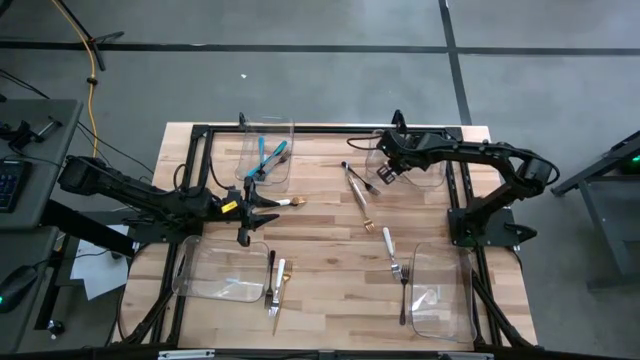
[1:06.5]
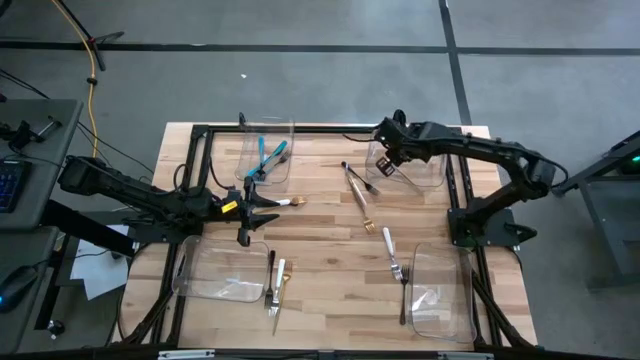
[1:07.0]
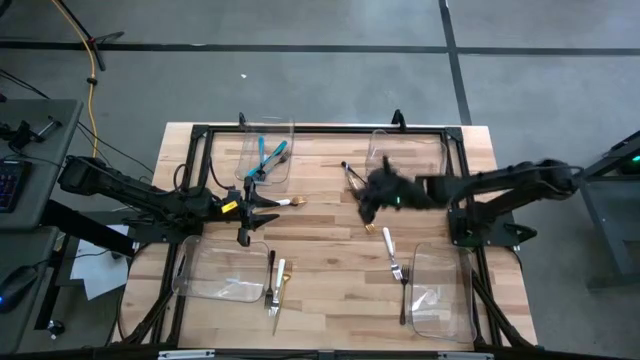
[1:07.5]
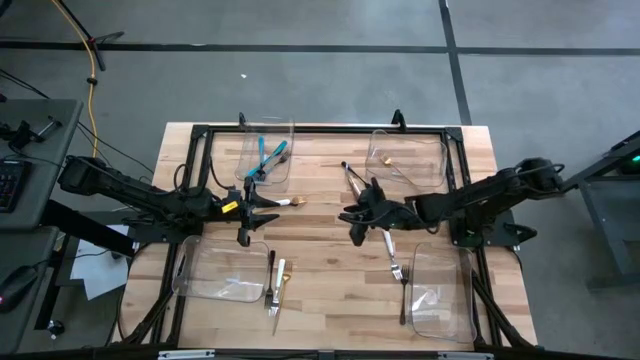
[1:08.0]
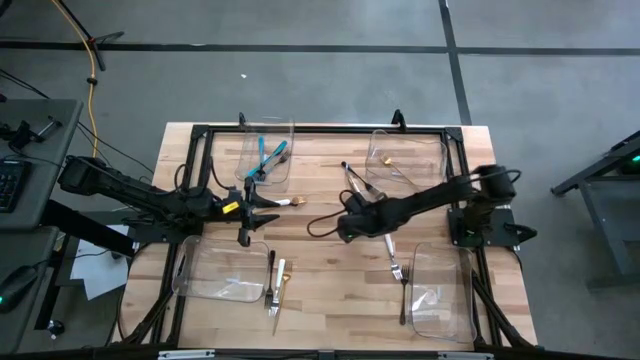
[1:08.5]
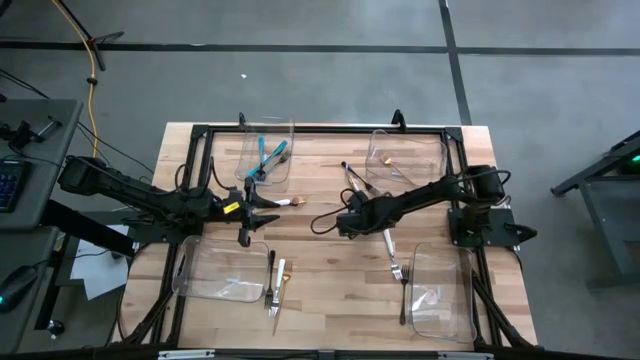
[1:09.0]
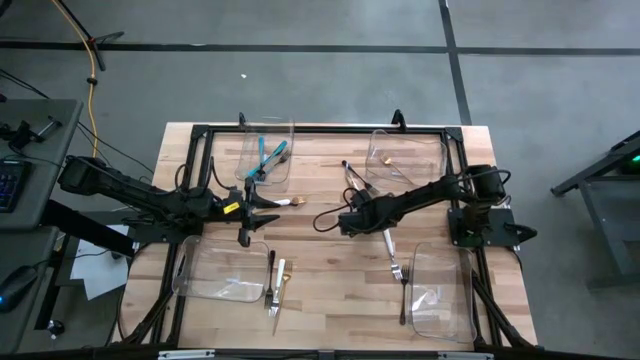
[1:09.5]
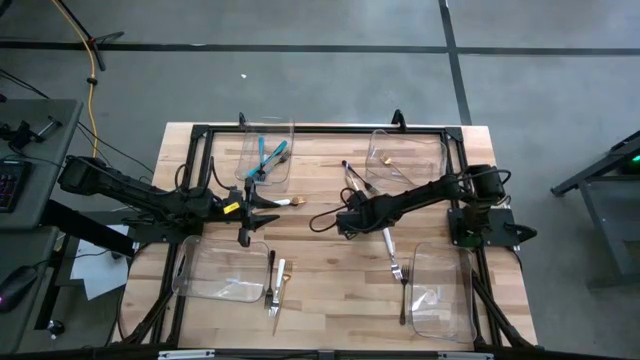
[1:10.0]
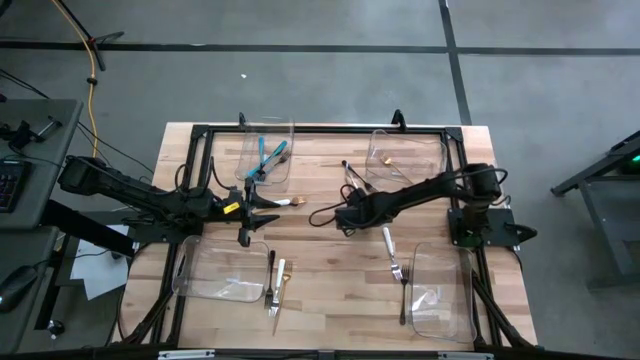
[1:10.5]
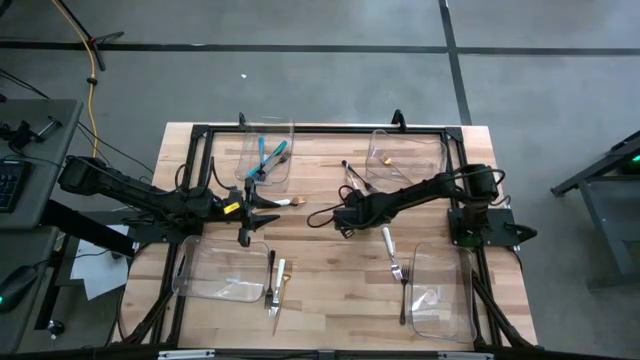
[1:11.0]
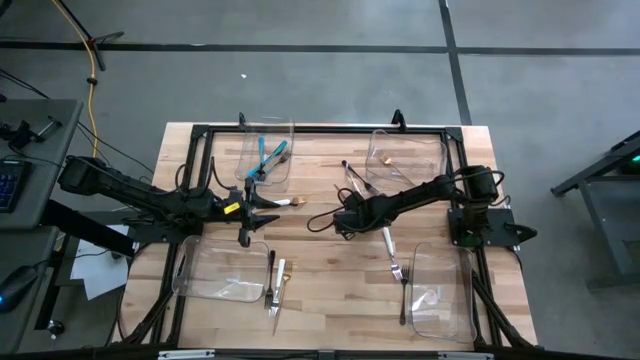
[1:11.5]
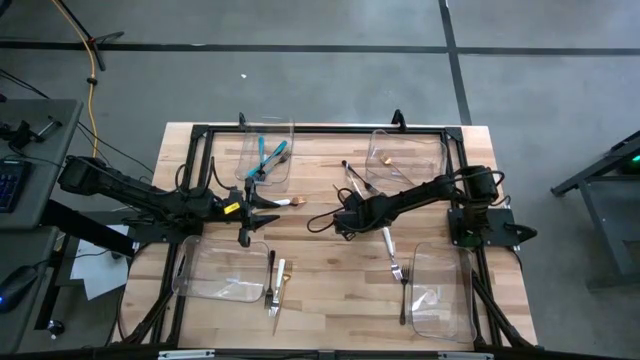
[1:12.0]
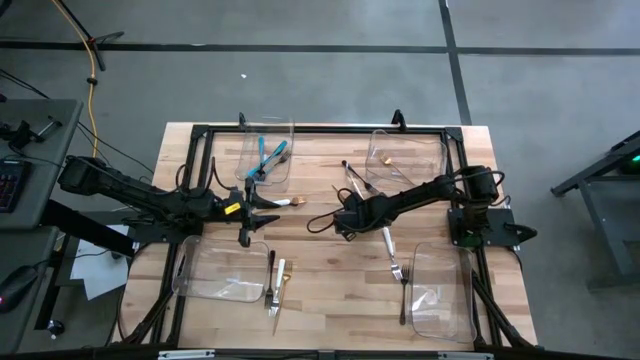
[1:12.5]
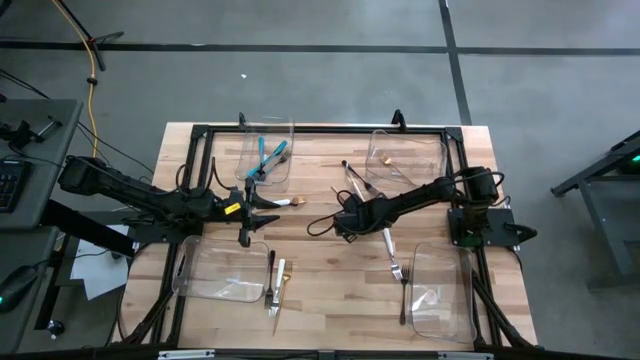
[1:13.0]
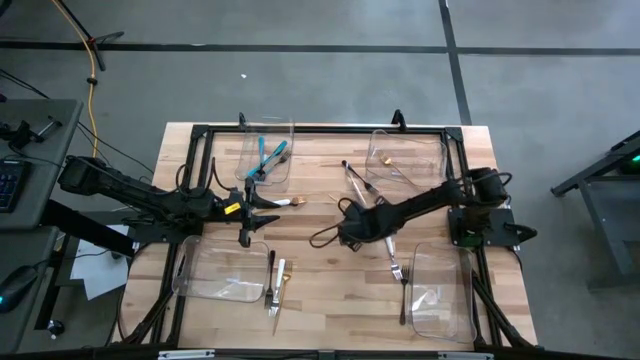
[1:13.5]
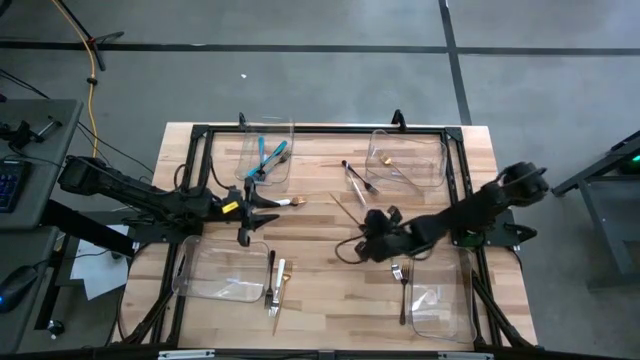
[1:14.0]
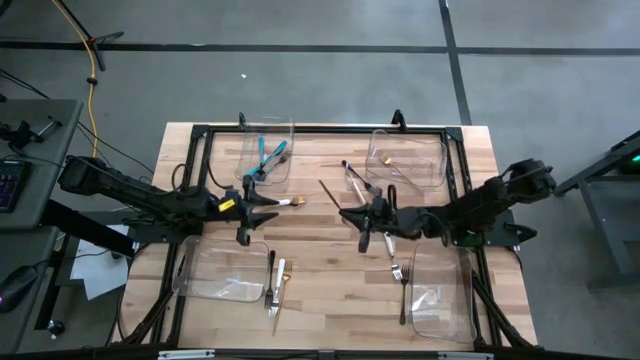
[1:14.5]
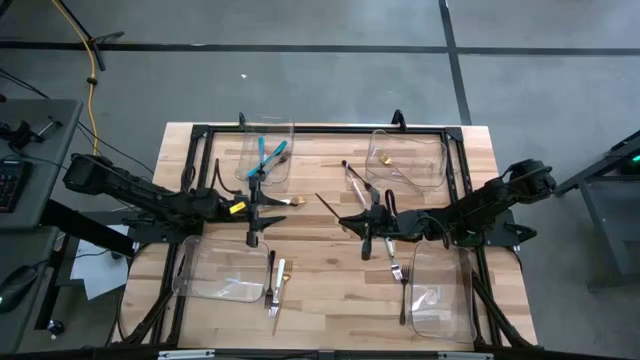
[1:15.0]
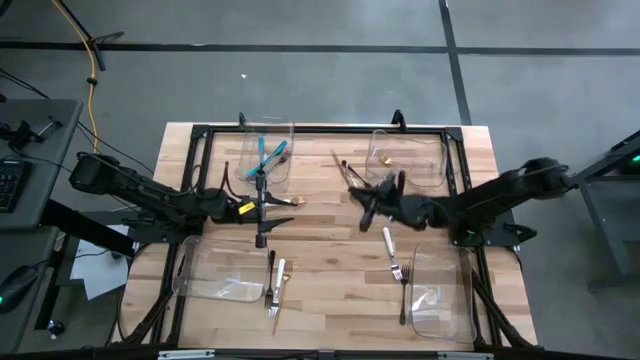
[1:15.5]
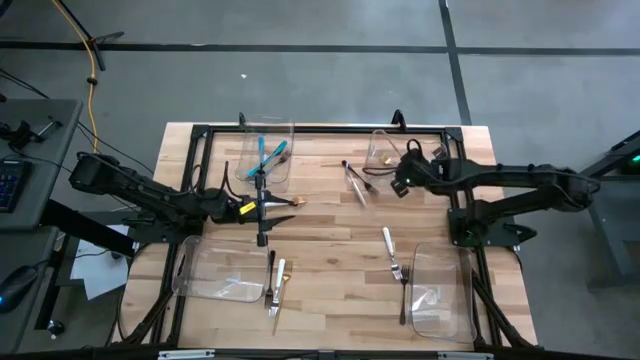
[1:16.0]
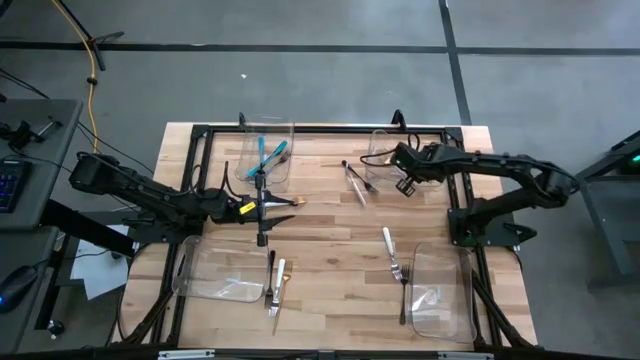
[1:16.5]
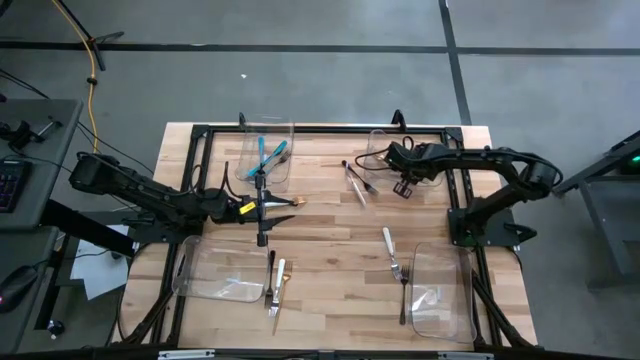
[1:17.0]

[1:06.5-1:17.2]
Task: Sort silverware by color (type)
Put the gold fork into the top right transparent bin

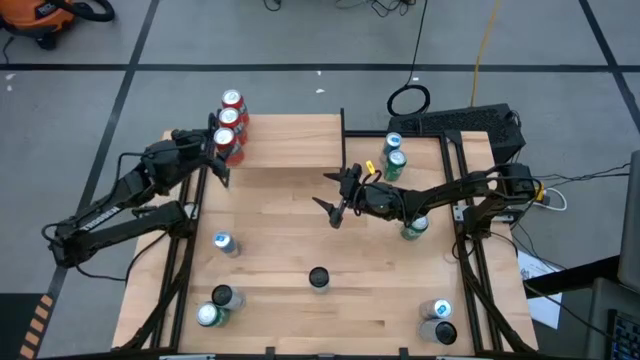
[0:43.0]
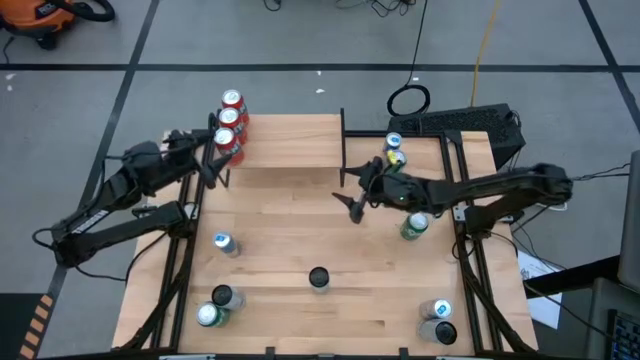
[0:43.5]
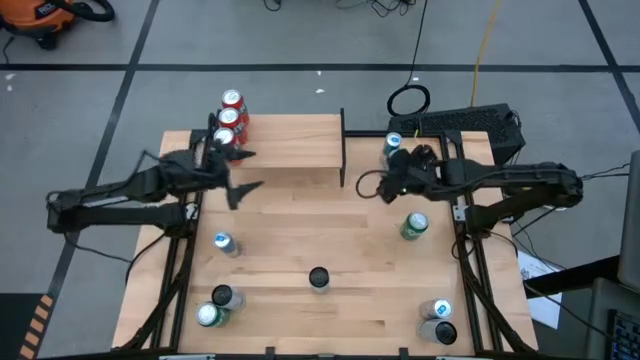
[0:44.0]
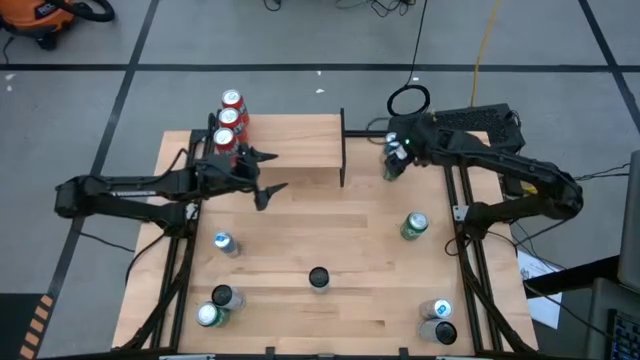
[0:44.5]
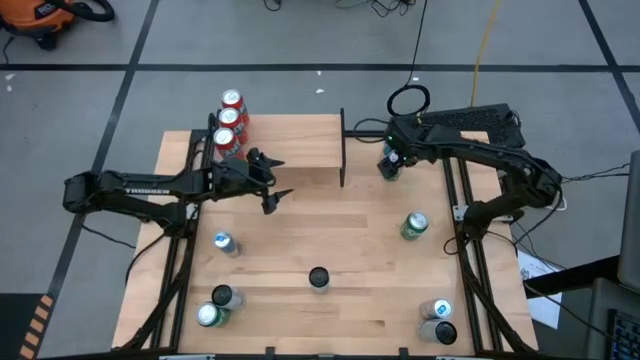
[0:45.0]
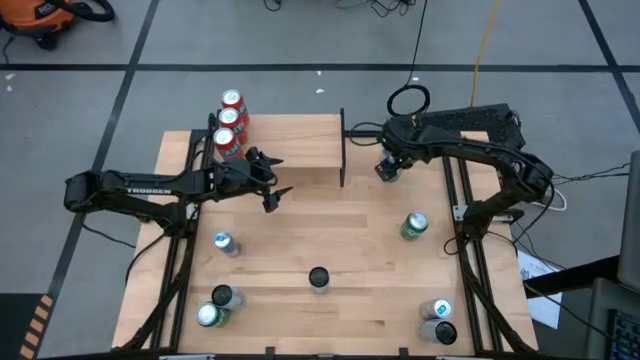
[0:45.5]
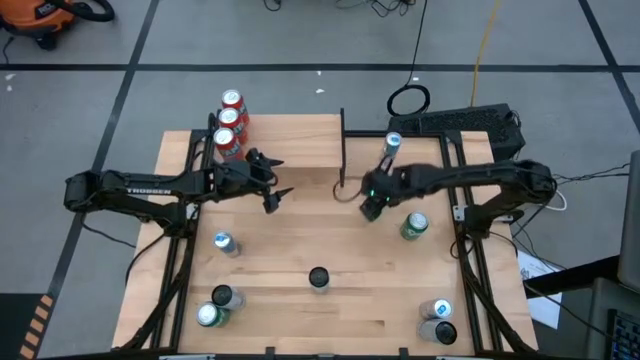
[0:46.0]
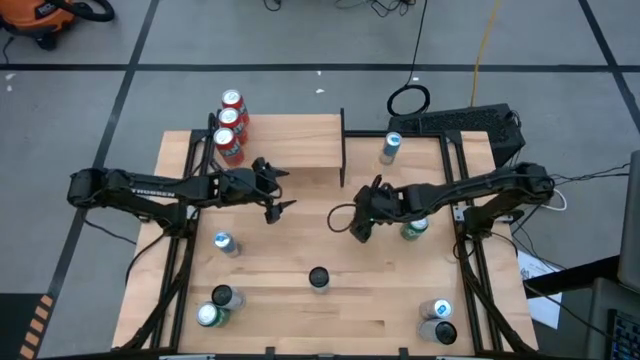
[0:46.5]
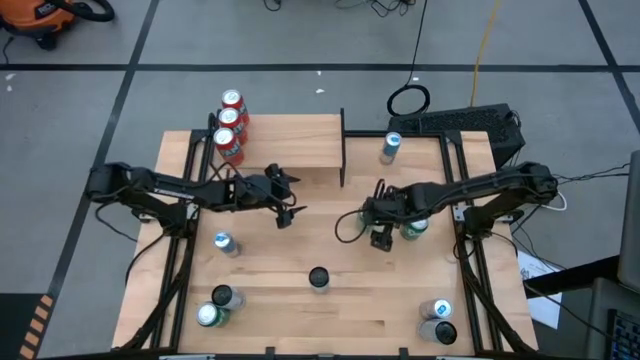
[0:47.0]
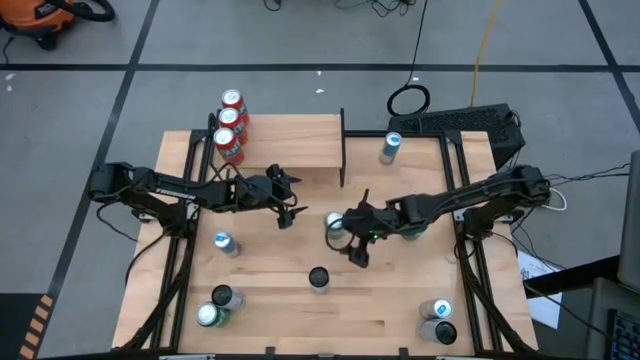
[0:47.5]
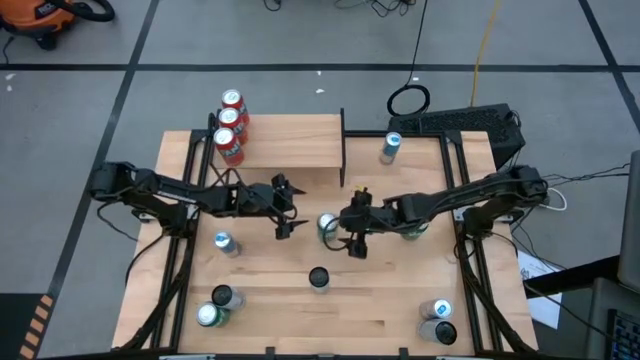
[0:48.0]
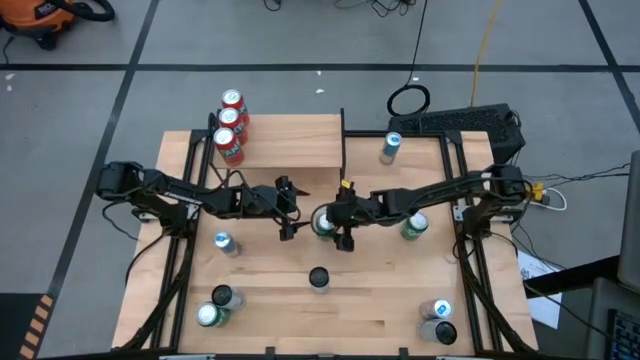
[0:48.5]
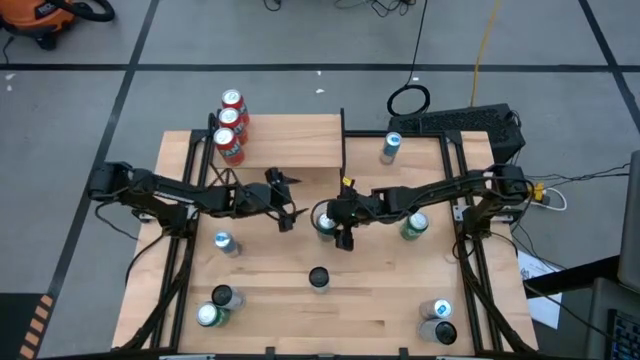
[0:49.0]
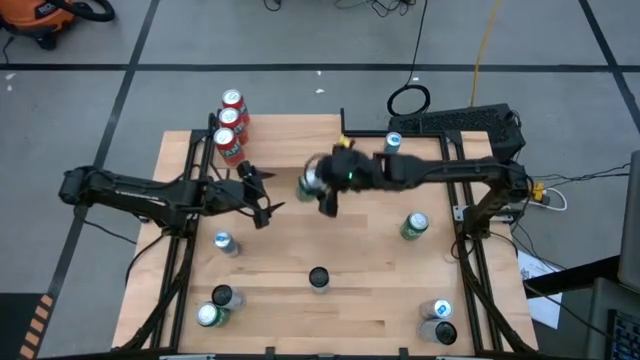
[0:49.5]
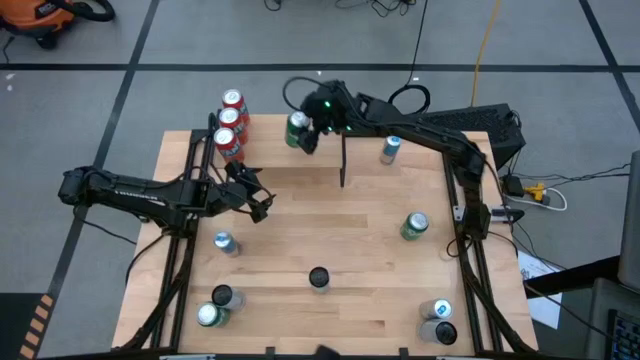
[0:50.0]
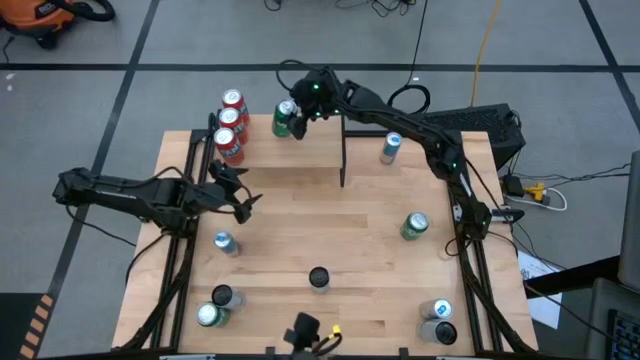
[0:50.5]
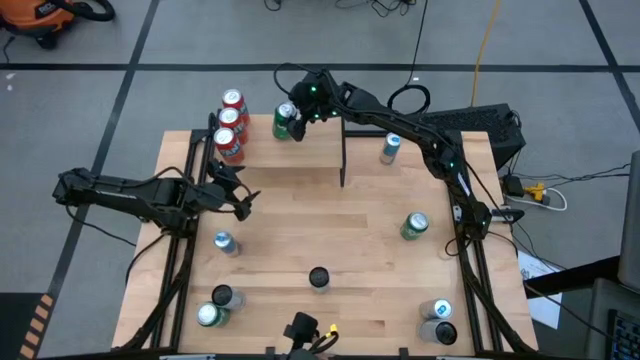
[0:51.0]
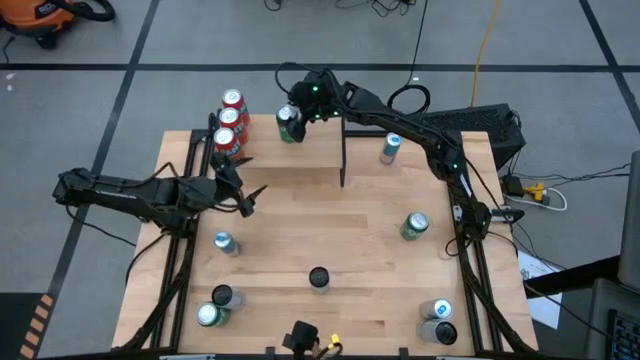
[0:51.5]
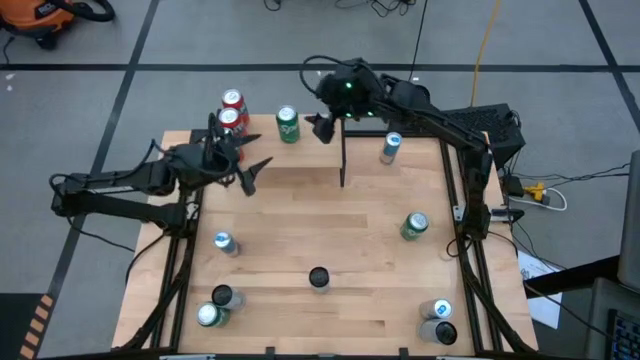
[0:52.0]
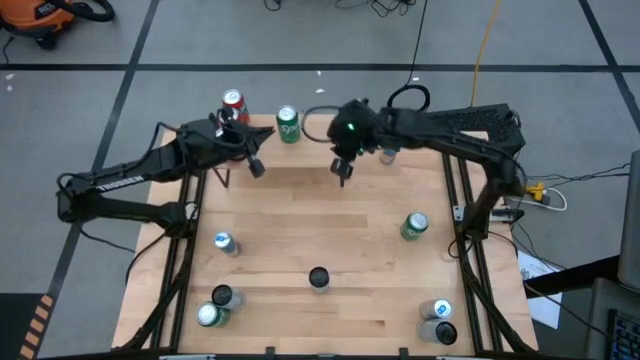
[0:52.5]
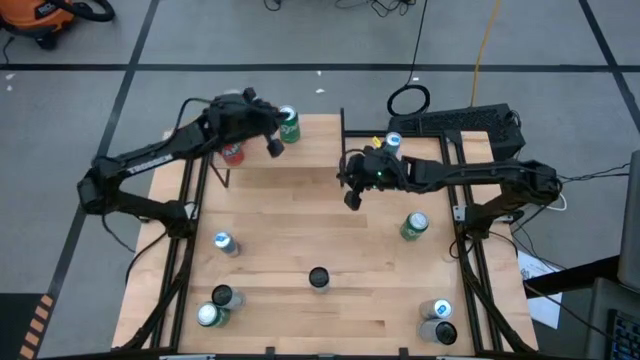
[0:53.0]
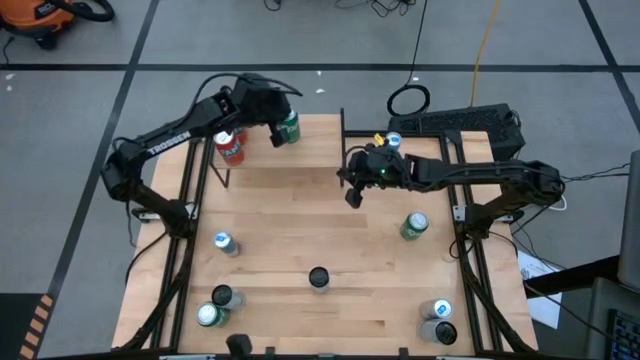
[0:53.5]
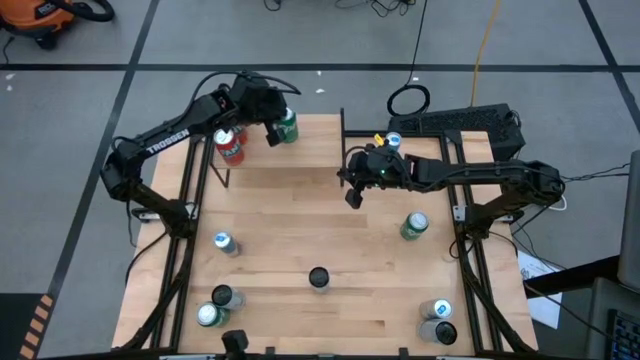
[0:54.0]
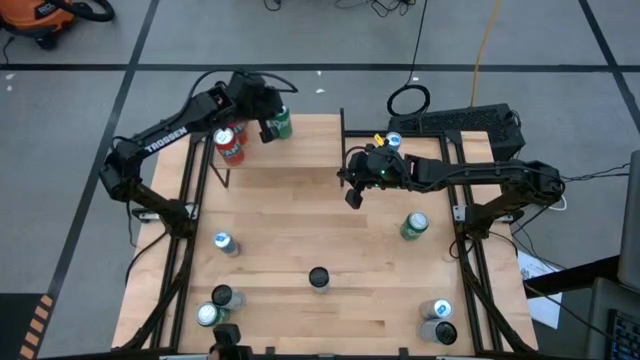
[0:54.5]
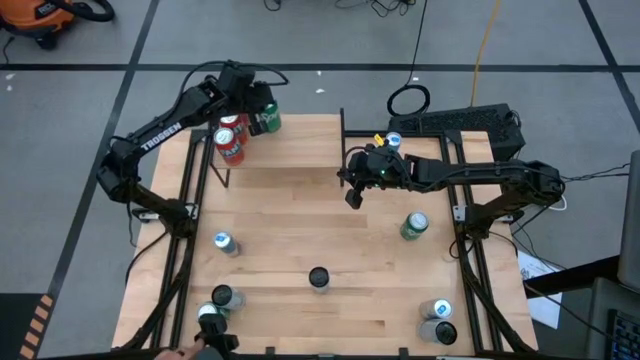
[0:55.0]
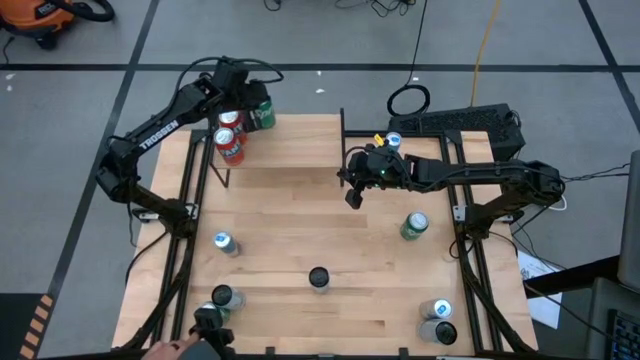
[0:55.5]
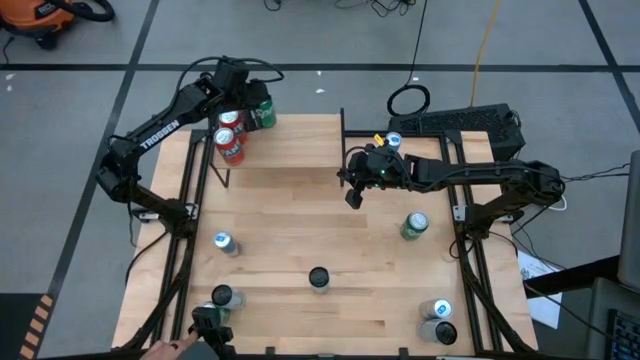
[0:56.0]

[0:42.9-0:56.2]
Task: Place canned beverage on shelf
Put the right green soda can on the shelf
